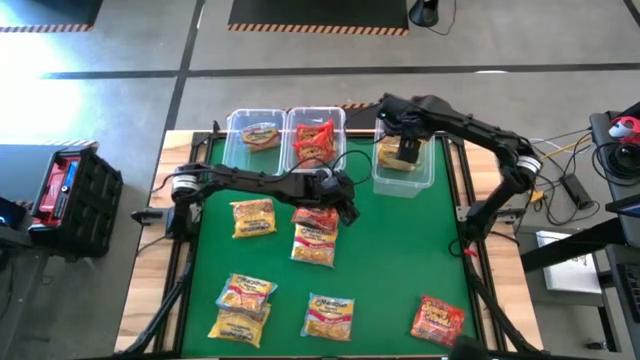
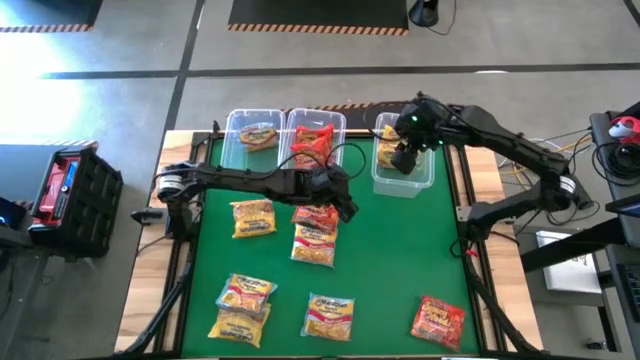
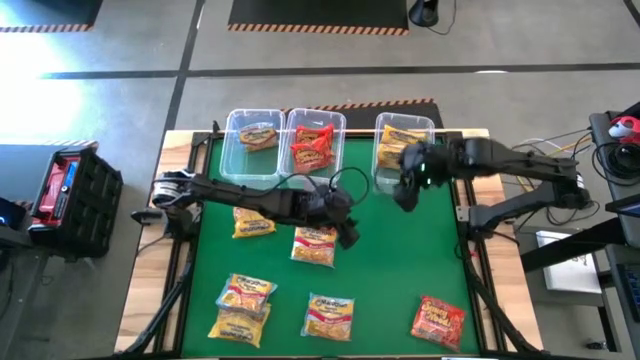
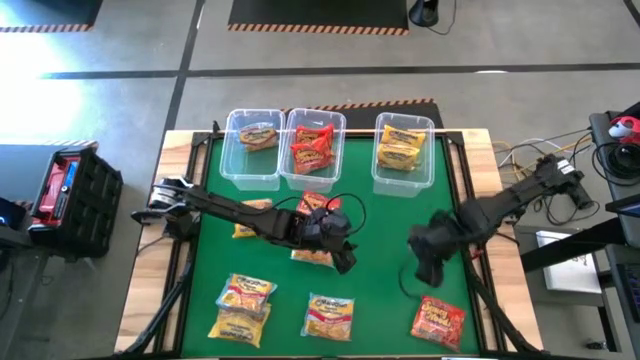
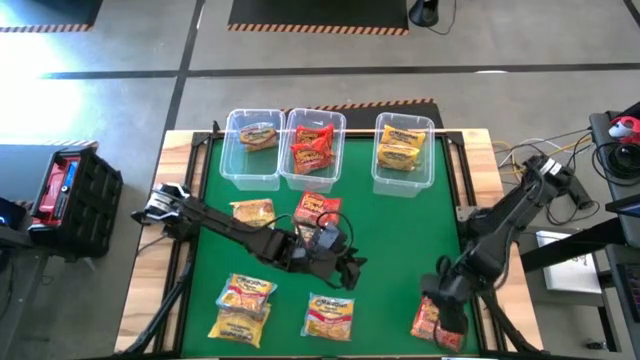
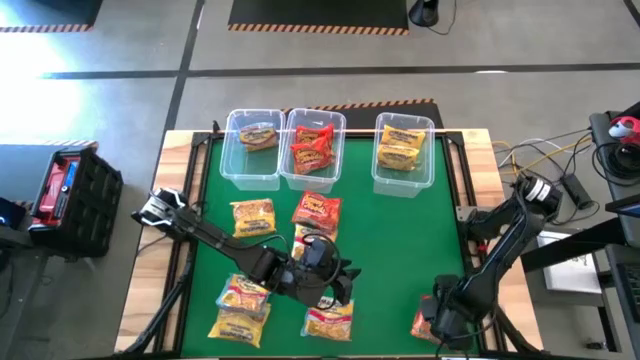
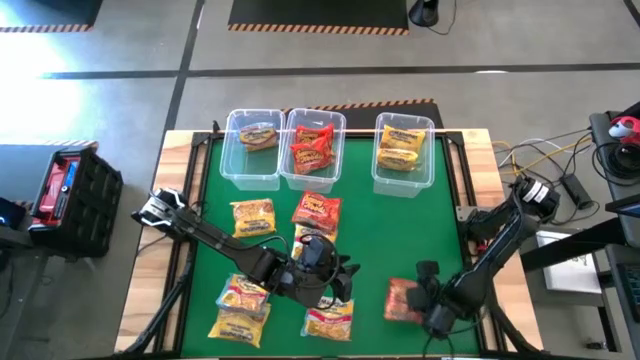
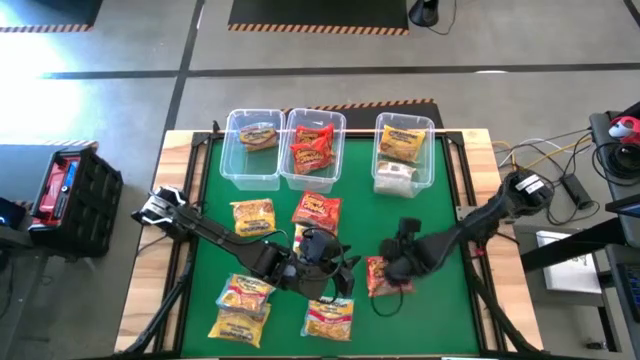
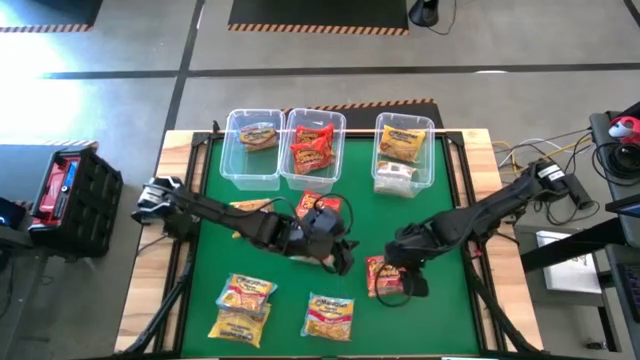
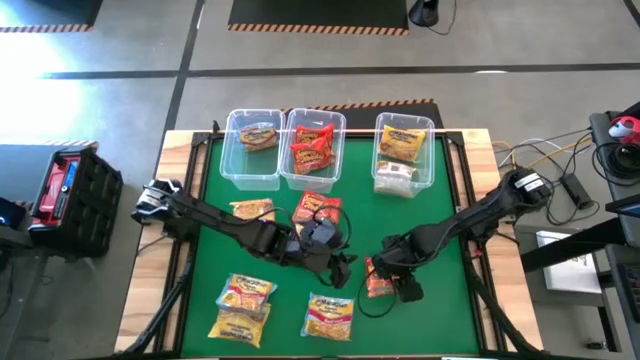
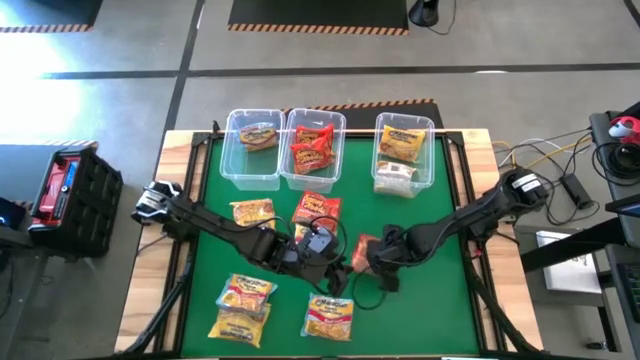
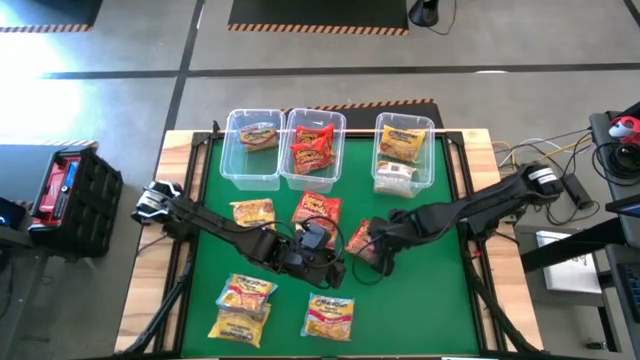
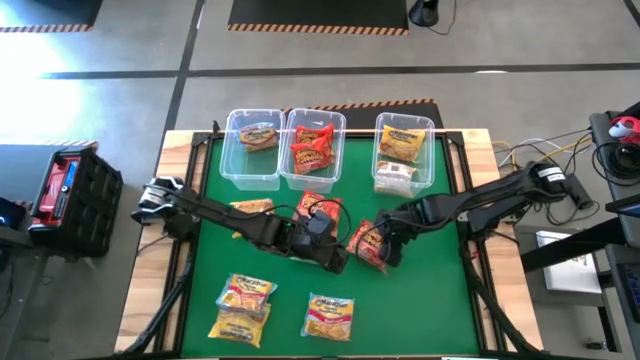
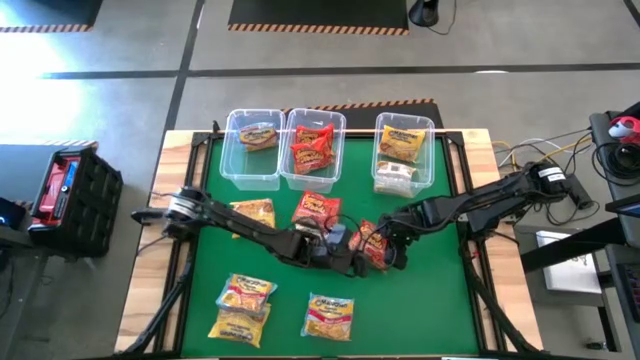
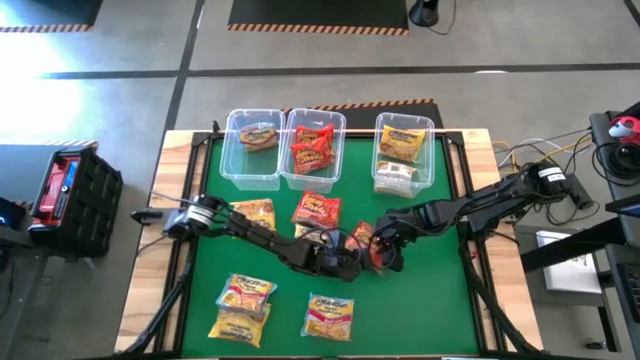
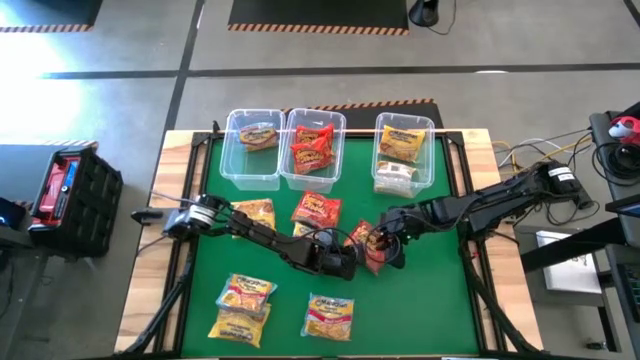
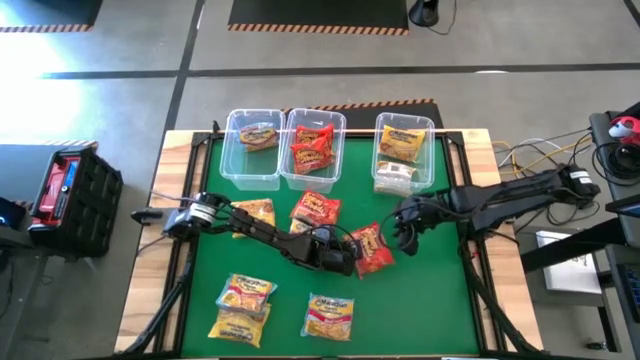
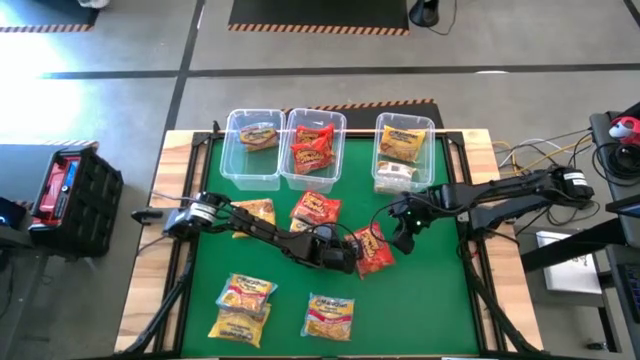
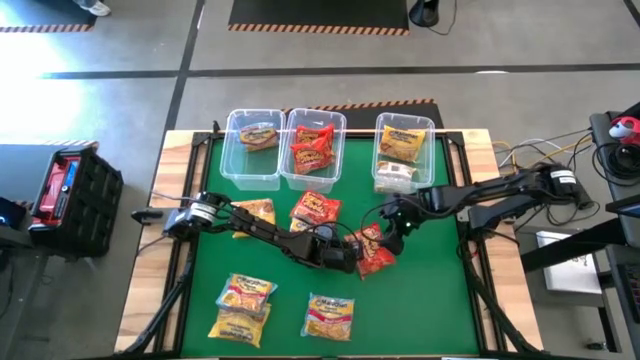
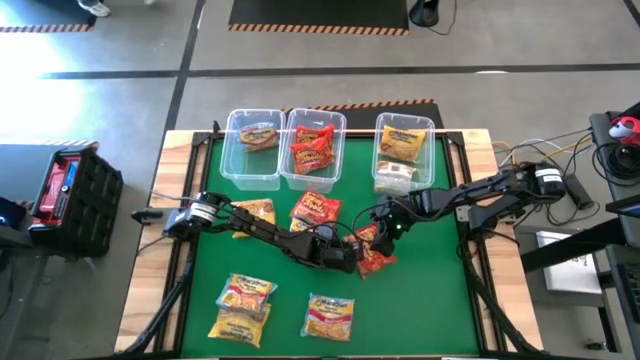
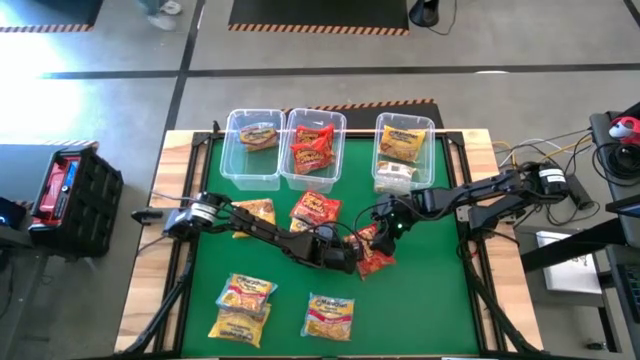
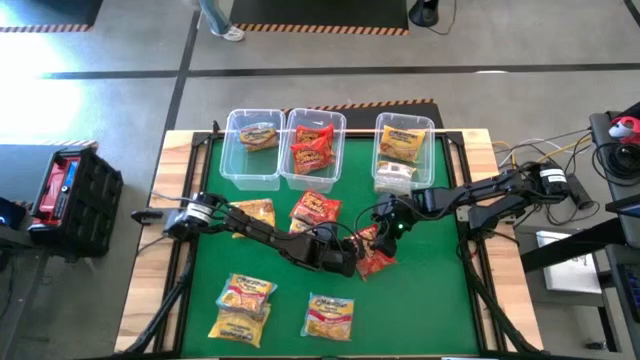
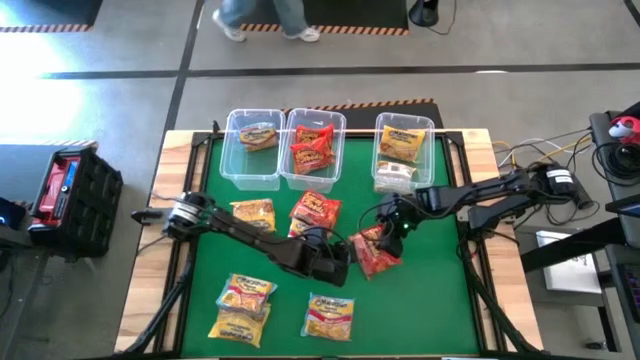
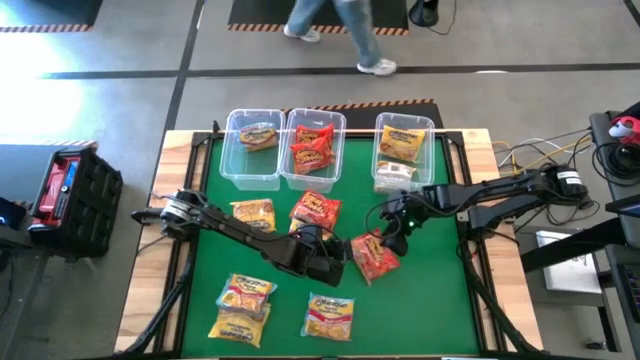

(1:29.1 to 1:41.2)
Task: Sort Maruchan noodles
Put the bottom orange noodle pack into the top center transparent bin

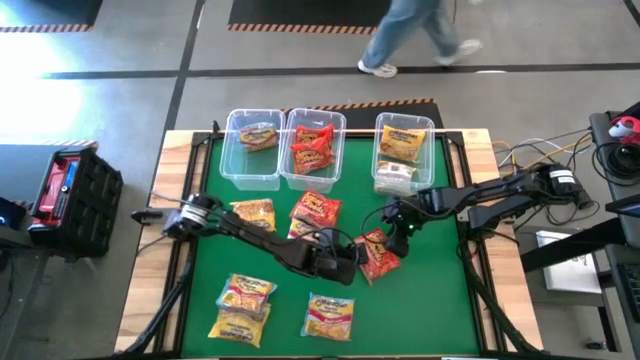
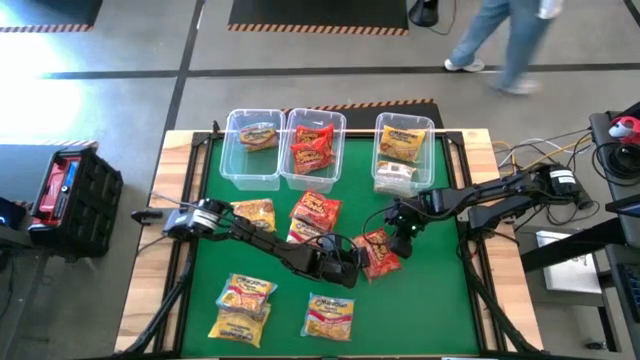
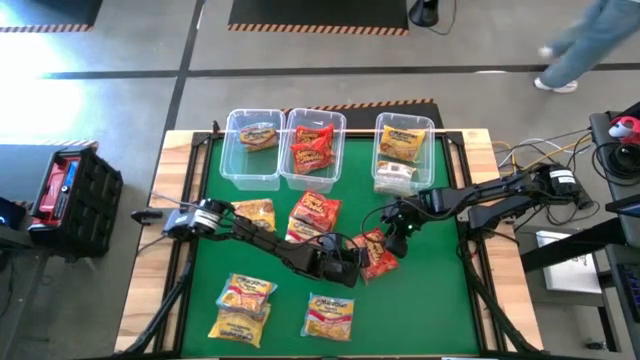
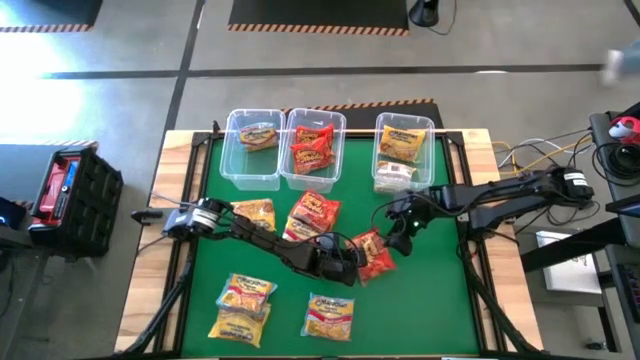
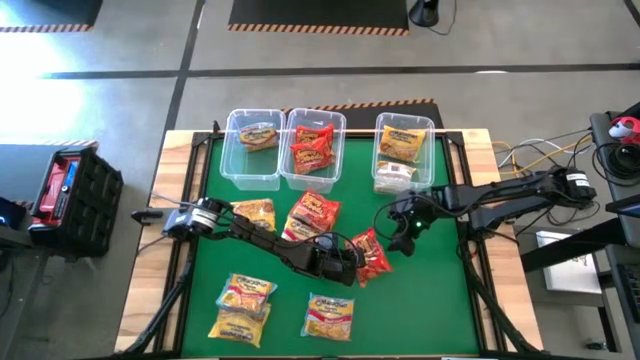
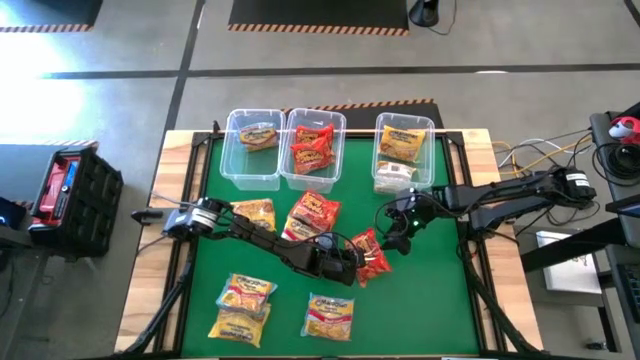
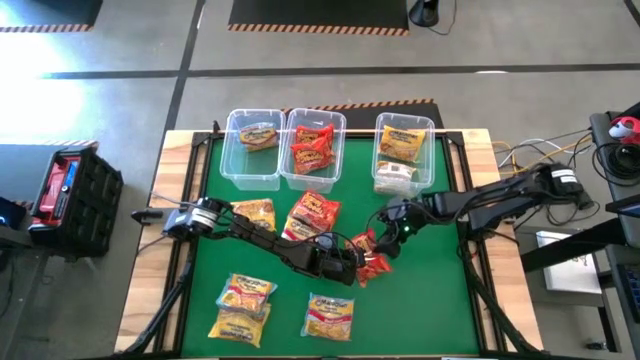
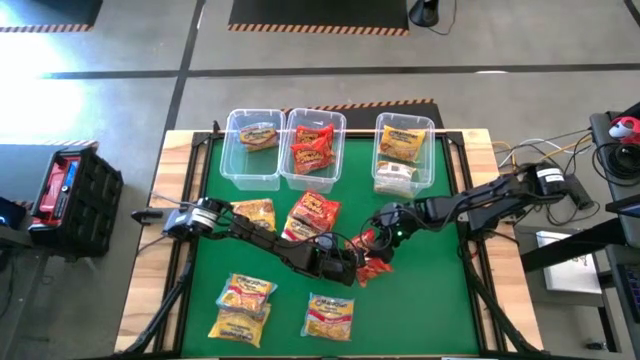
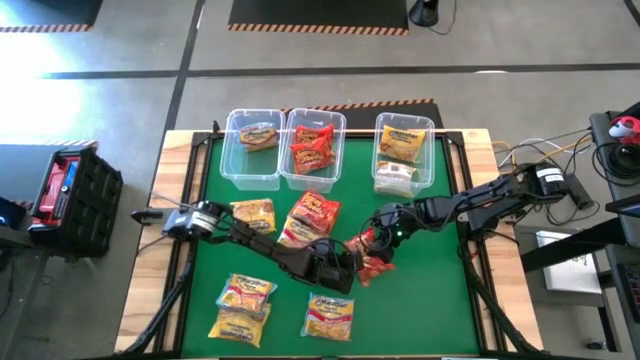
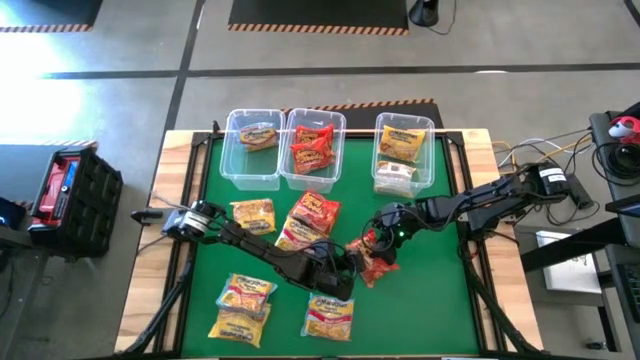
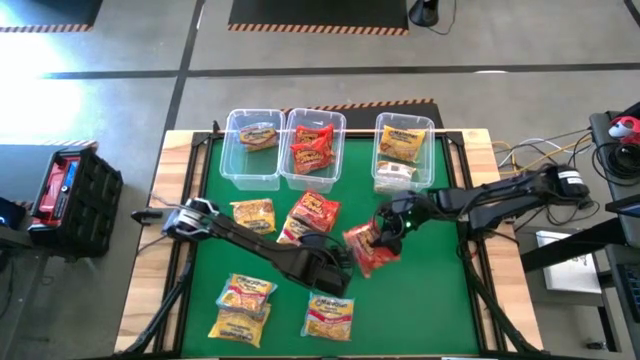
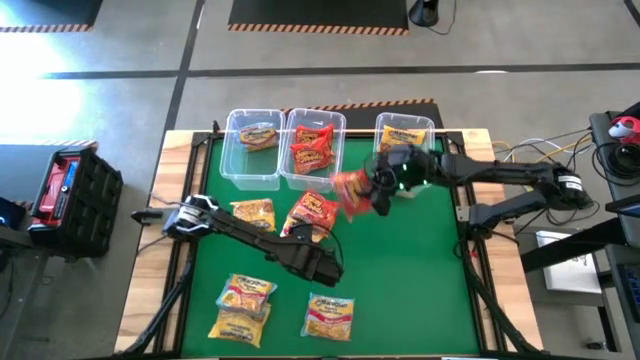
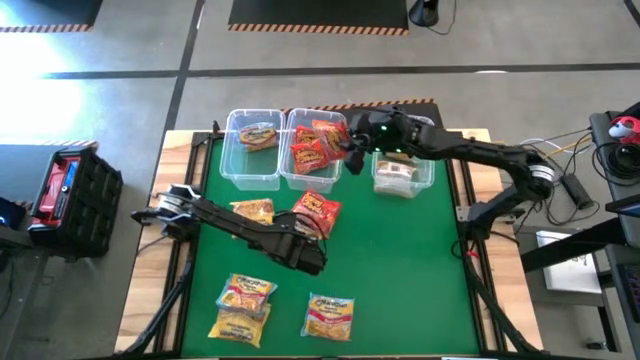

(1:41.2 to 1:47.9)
Put the bottom orange noodle pack into the top center transparent bin

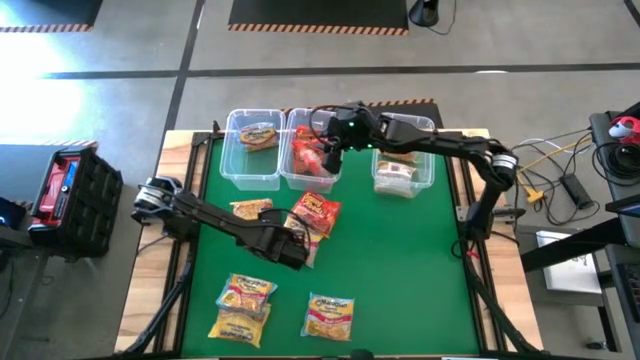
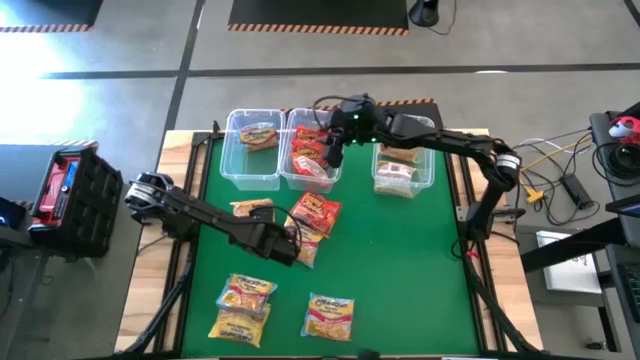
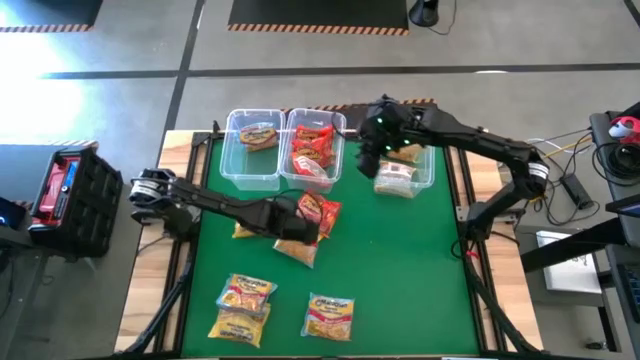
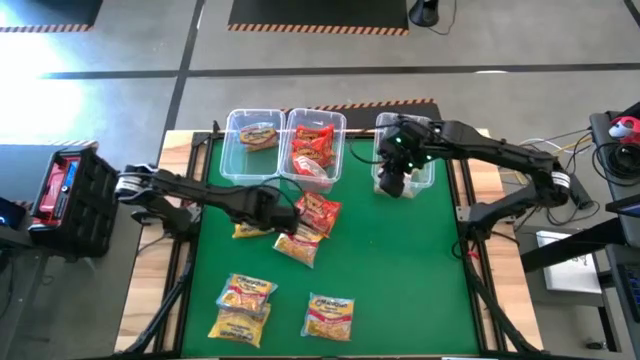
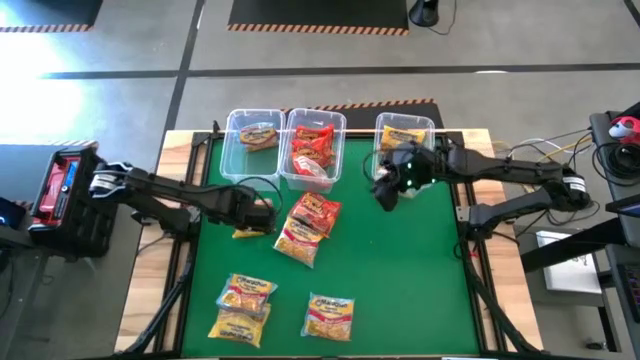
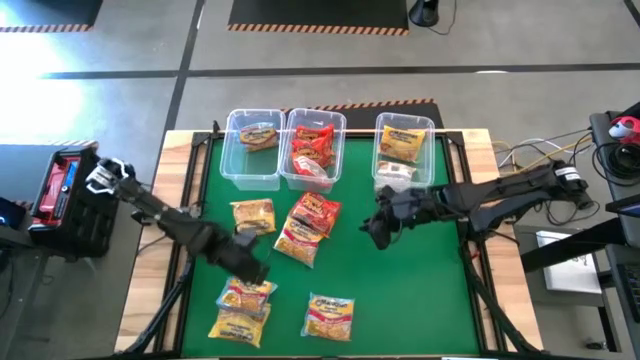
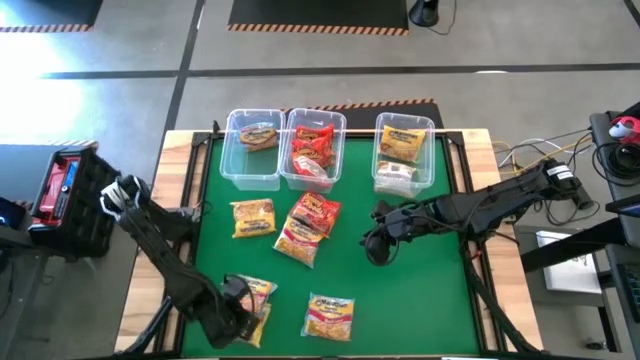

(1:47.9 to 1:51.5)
Adjust the blue noodle pack
